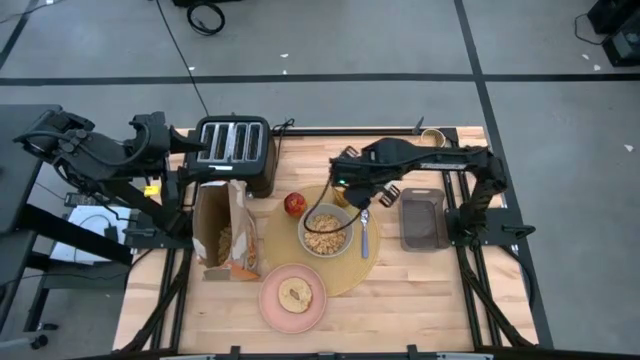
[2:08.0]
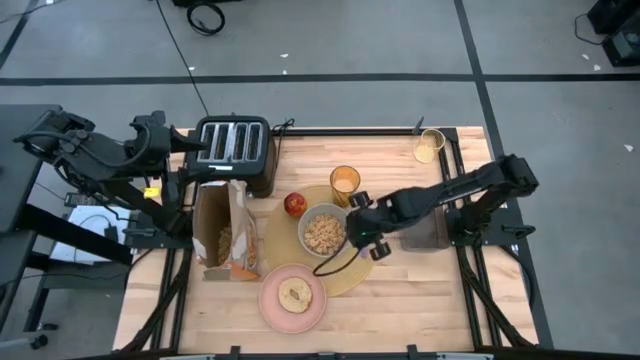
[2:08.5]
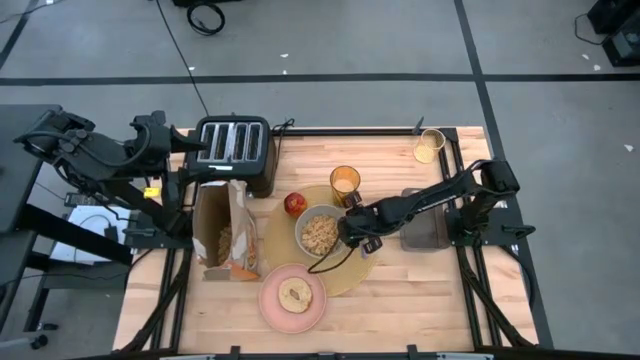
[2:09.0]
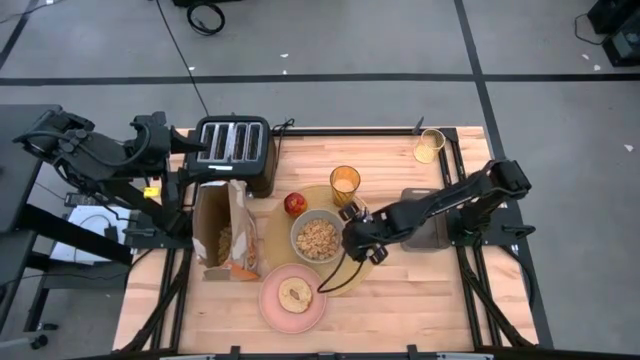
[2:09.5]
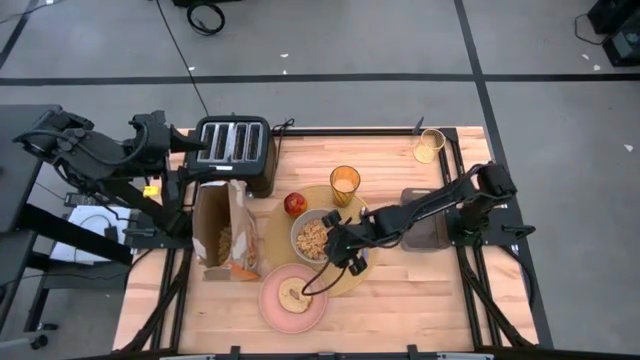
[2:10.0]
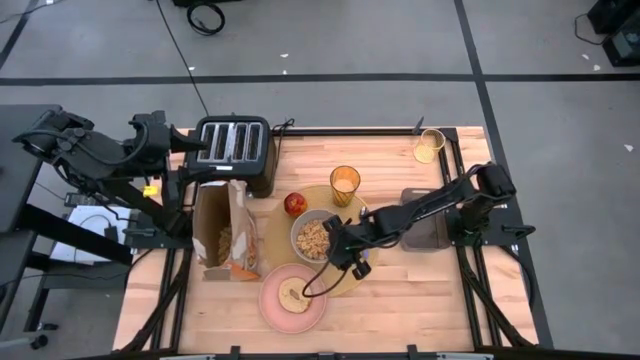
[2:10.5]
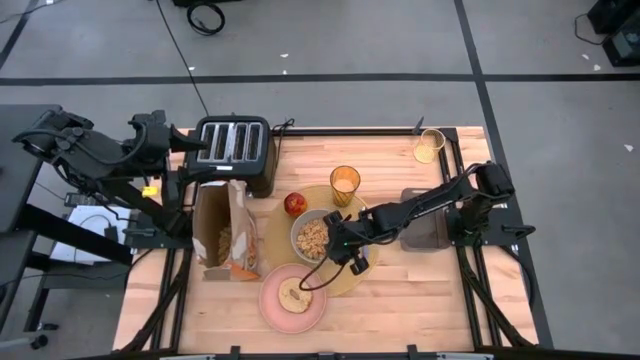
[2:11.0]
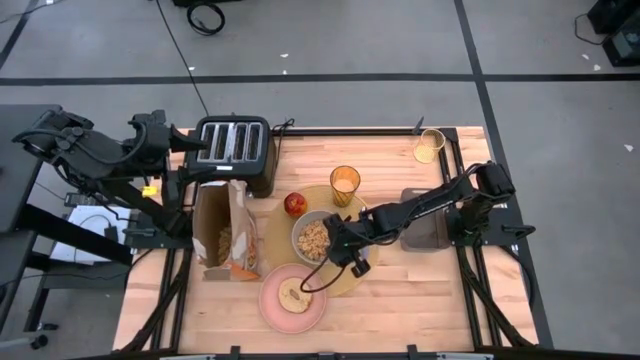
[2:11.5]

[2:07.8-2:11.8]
Task: Arrange a breakfast setting
Adjust the gray bowl

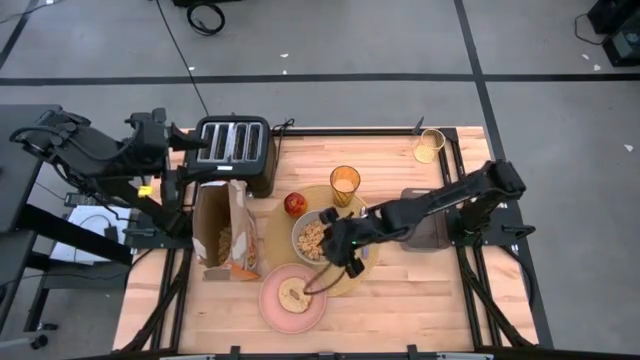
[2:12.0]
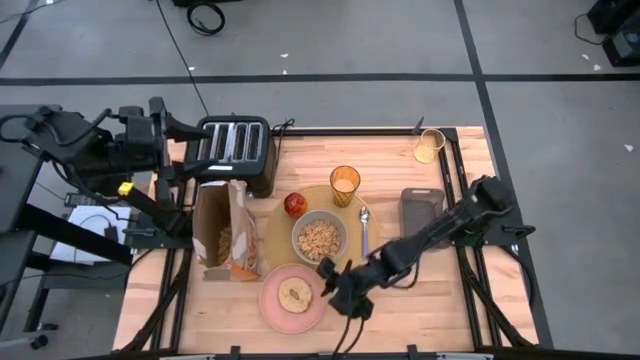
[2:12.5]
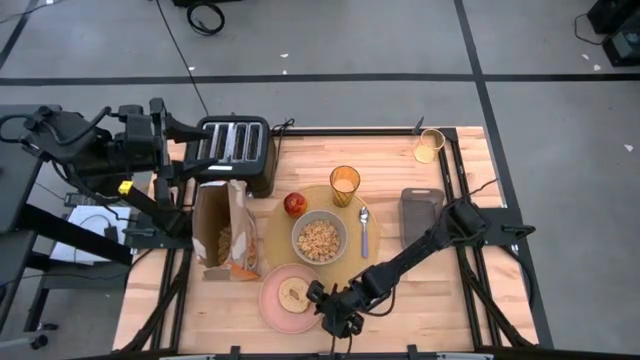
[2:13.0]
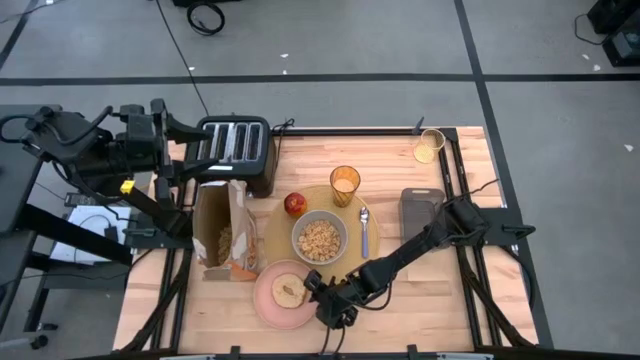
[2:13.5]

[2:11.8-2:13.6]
Adjust the light orange plate

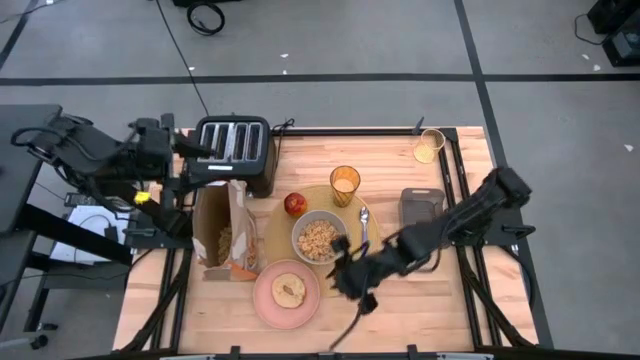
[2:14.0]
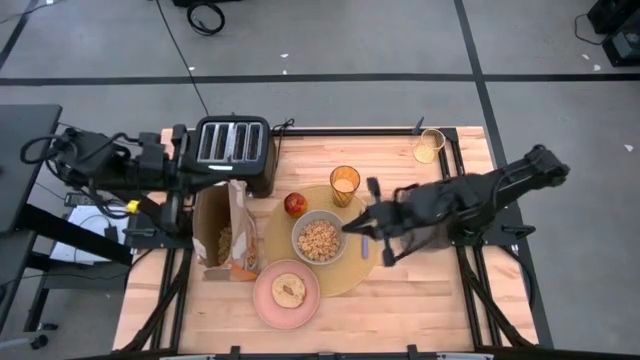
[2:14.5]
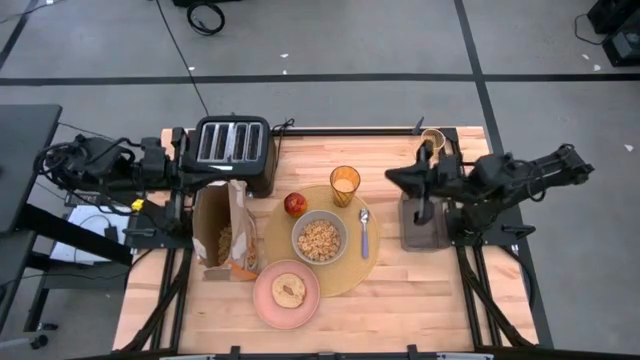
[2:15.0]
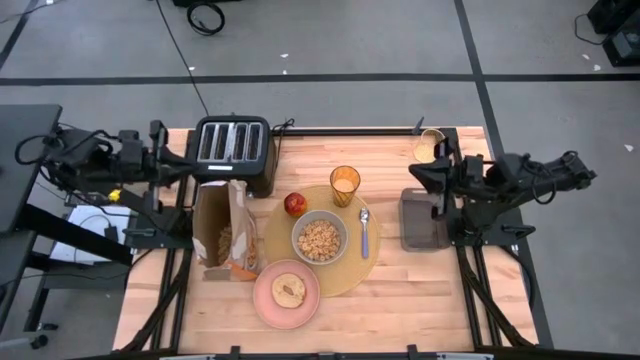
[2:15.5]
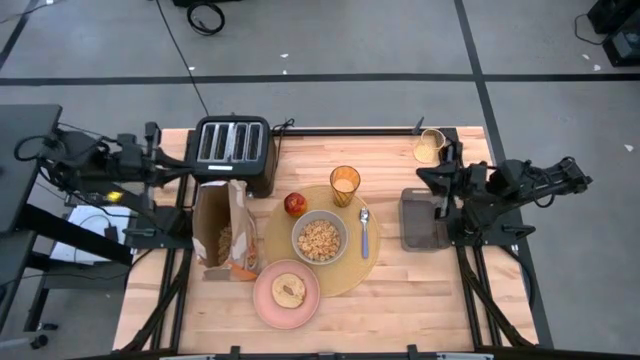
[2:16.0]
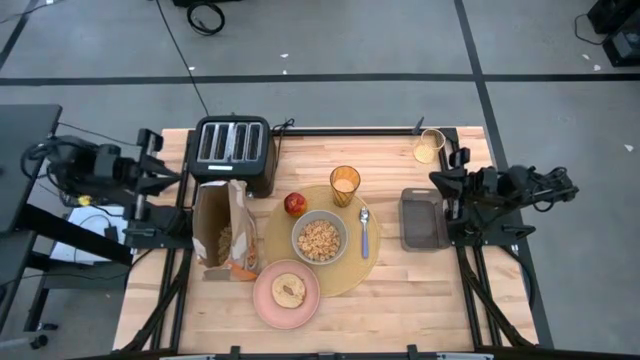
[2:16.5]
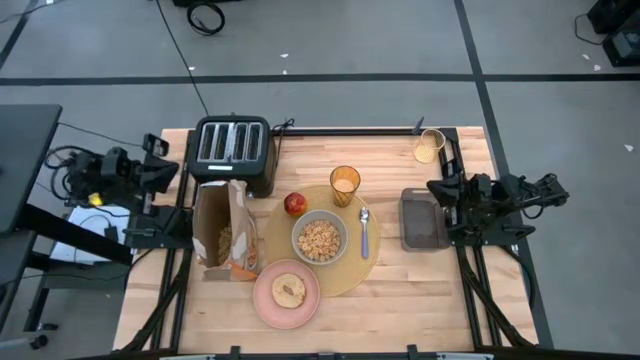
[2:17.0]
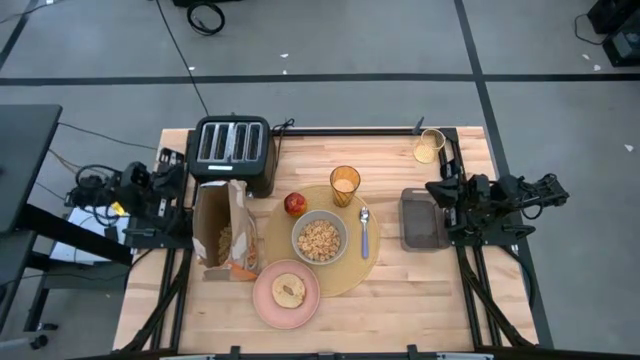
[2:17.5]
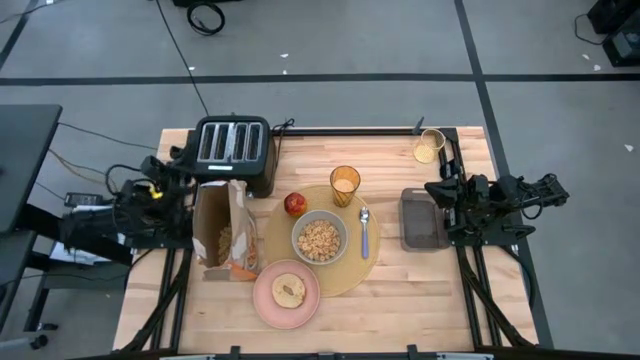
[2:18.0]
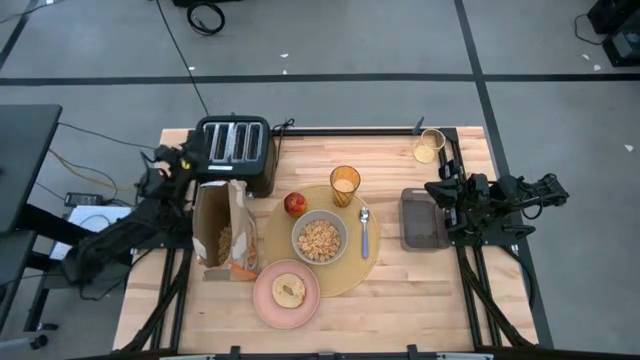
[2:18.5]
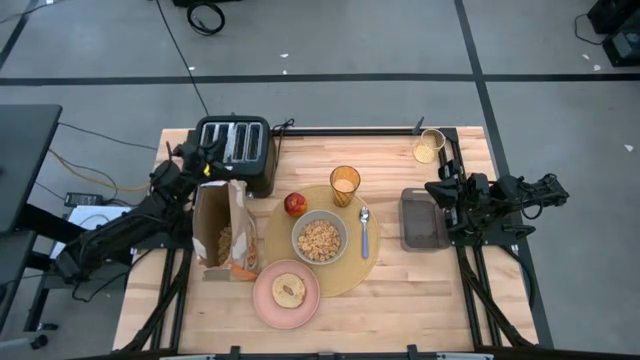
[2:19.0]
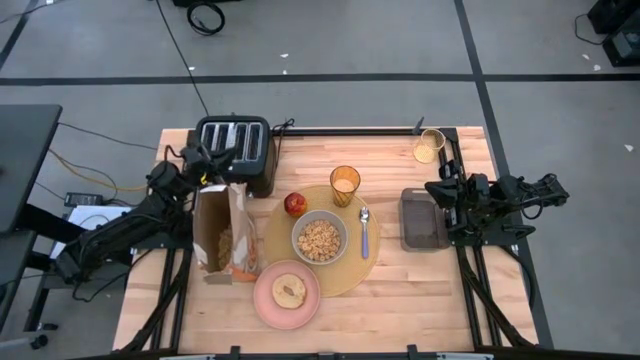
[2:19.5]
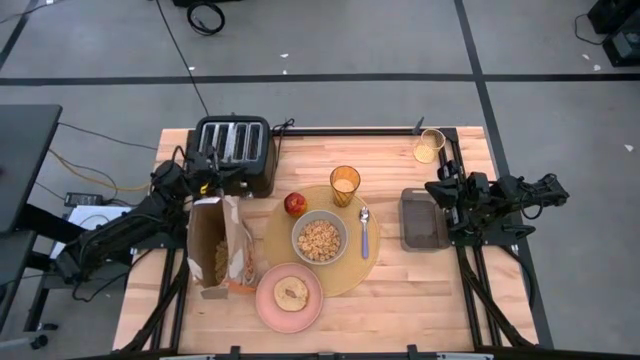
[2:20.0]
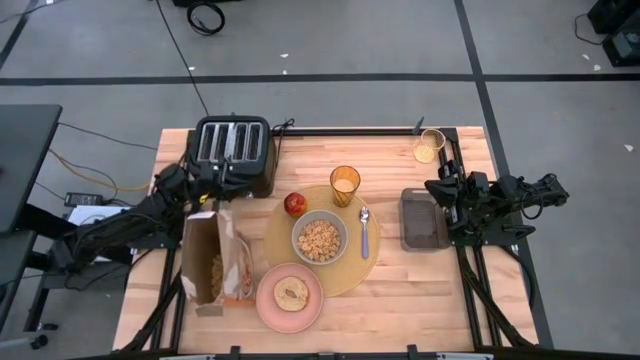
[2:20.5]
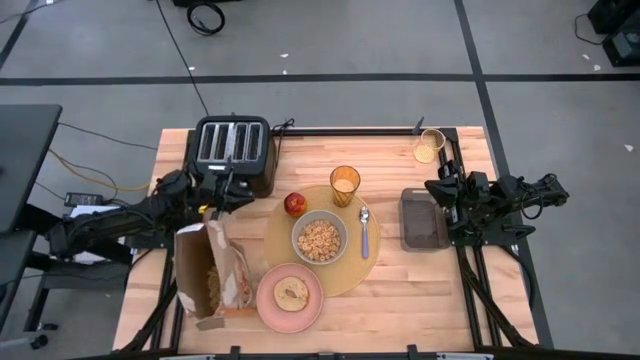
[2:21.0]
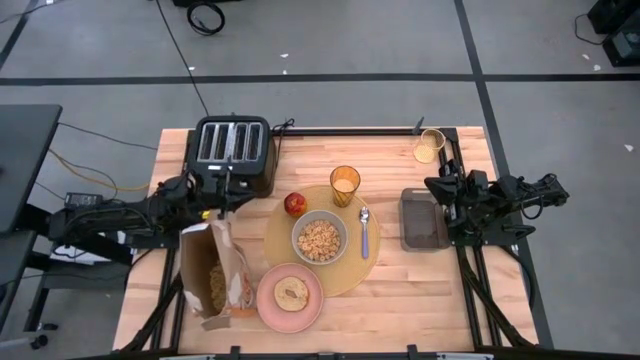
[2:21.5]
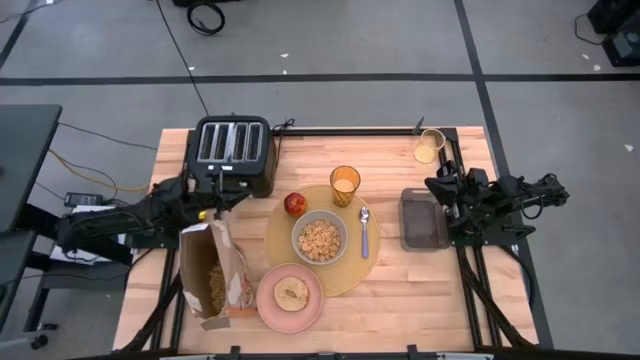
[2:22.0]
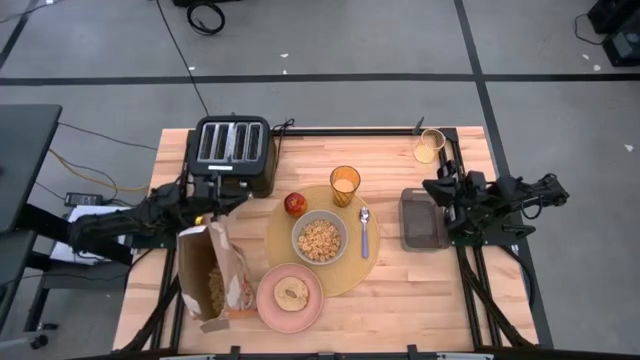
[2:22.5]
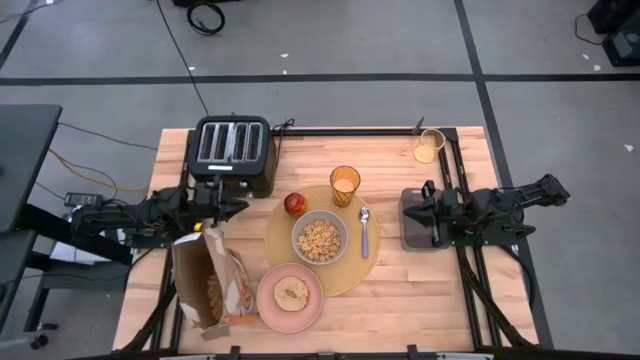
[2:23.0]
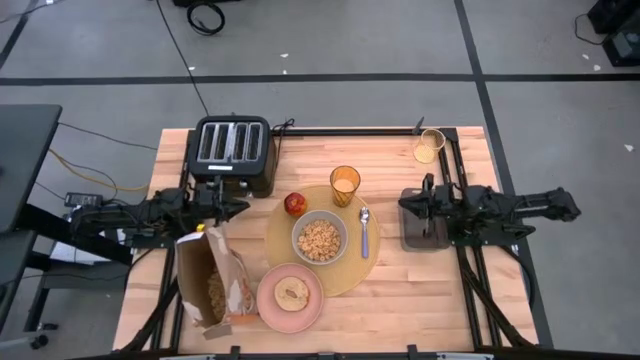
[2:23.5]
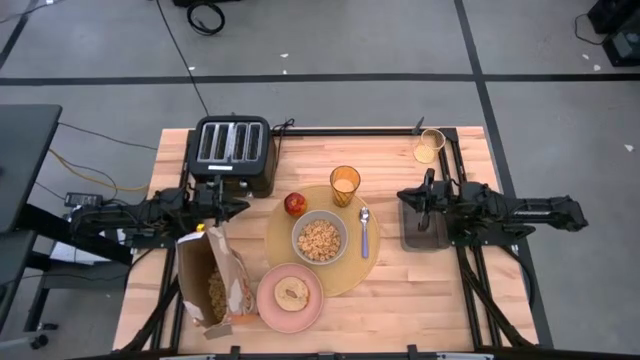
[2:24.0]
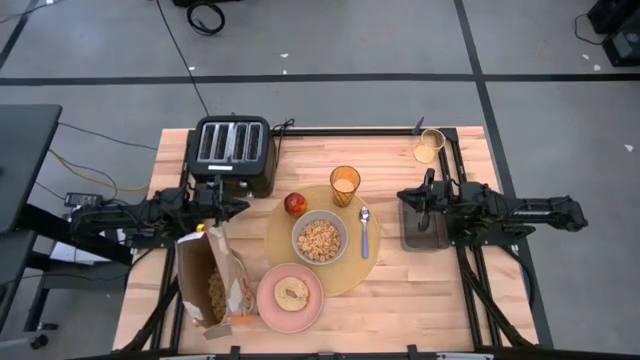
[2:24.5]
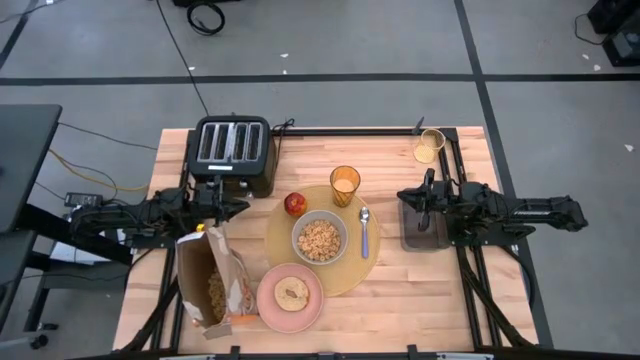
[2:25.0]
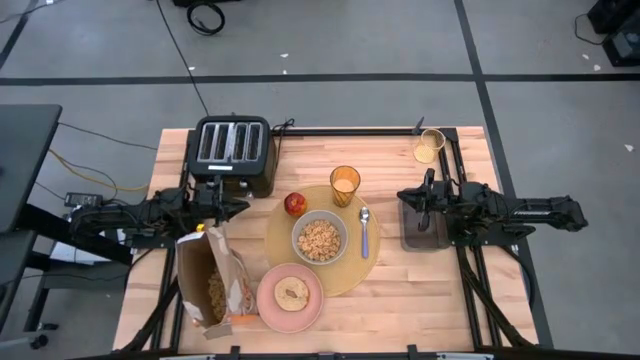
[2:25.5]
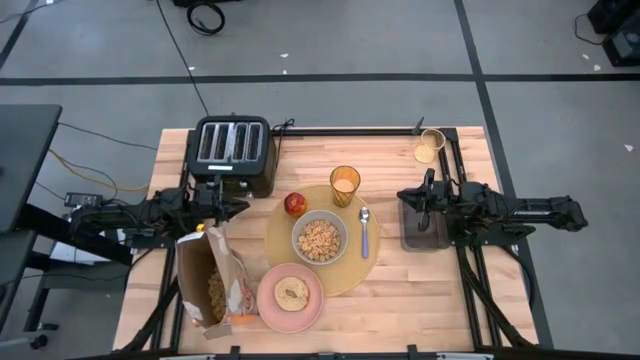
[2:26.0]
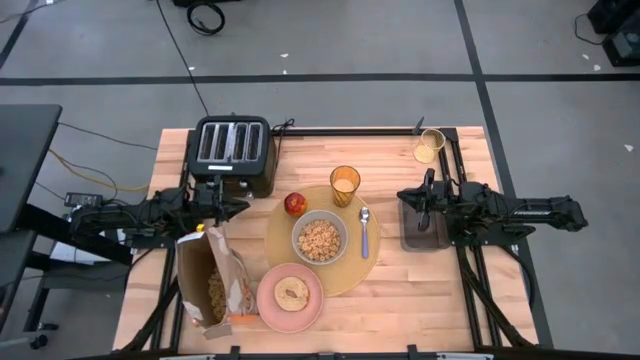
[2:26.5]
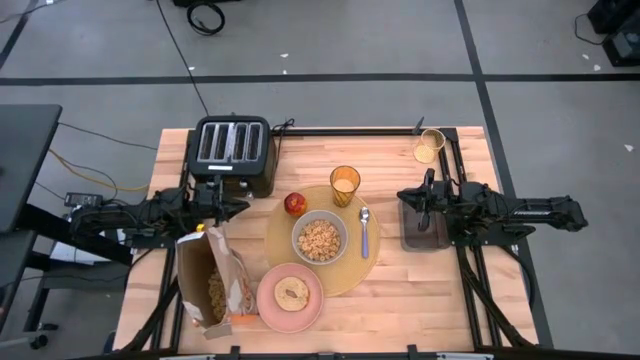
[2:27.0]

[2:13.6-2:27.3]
Return to Home Position

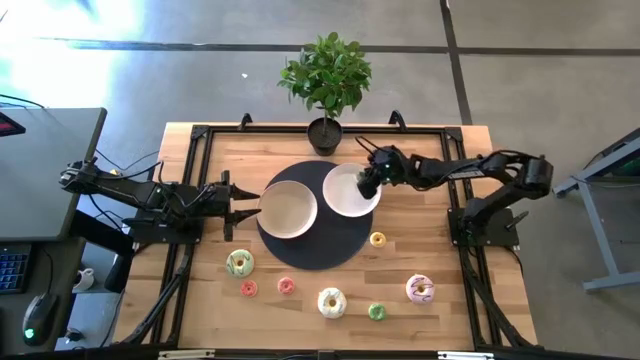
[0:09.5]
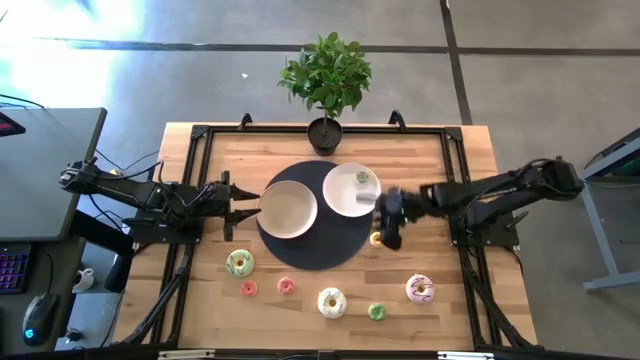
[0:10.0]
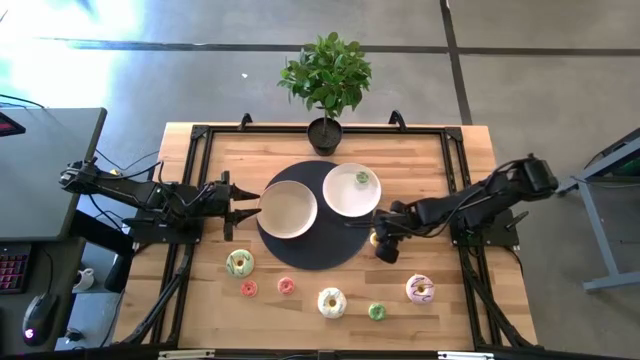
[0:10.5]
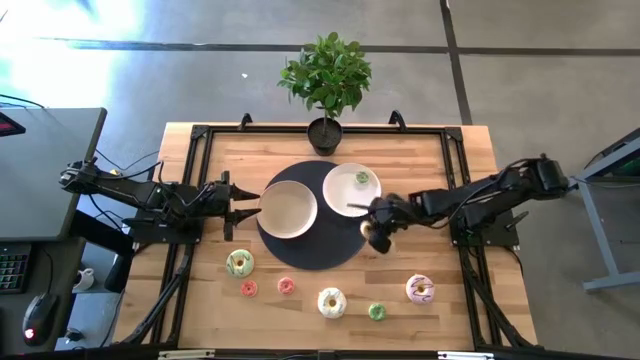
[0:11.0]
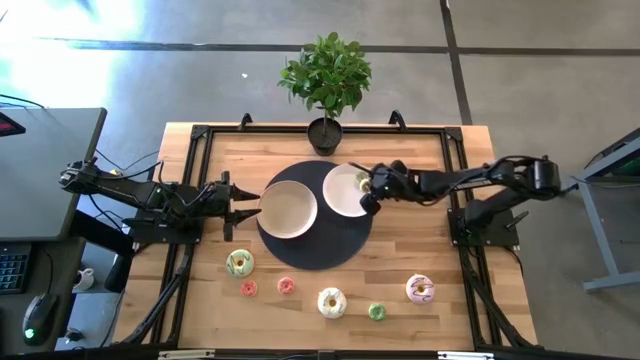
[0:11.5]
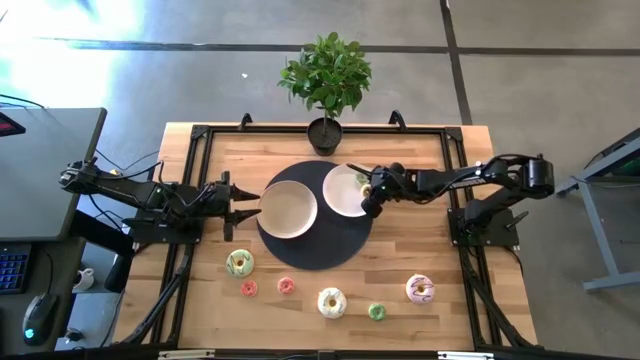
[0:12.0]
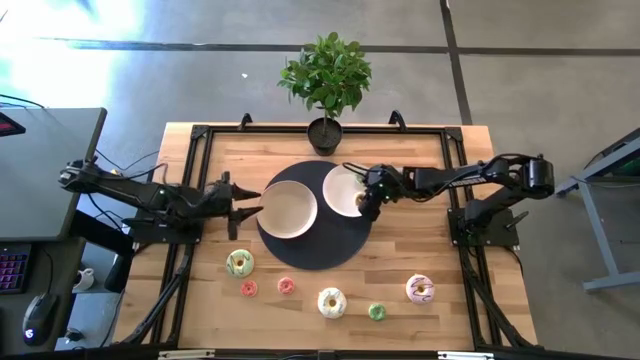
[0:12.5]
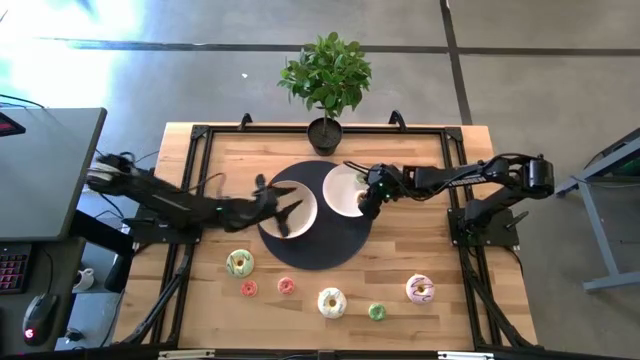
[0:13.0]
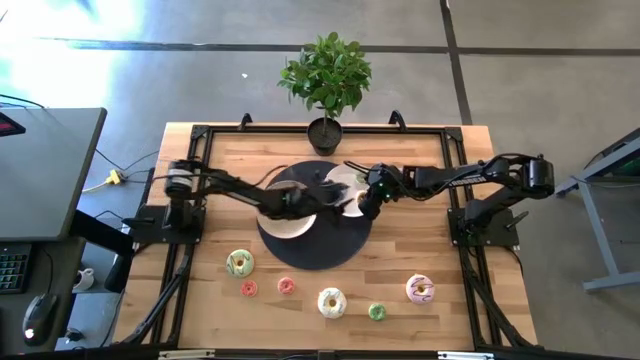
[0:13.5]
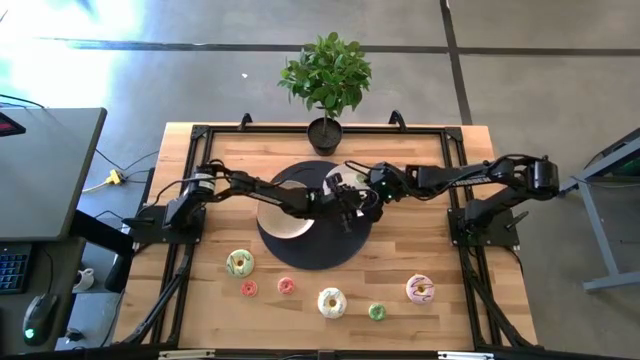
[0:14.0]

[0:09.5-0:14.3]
Task: Pick & Place donuts
Put the small yellow donut on the right white plate
